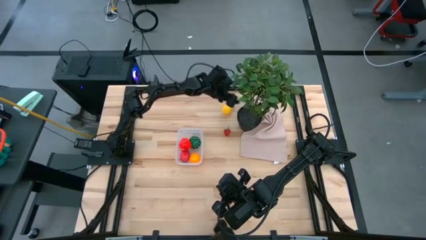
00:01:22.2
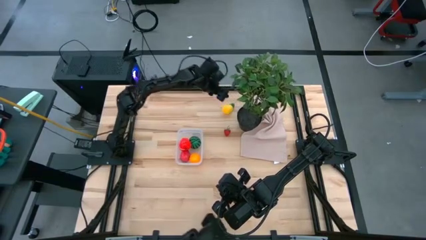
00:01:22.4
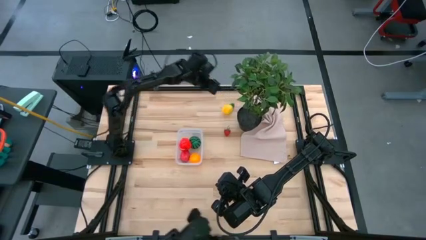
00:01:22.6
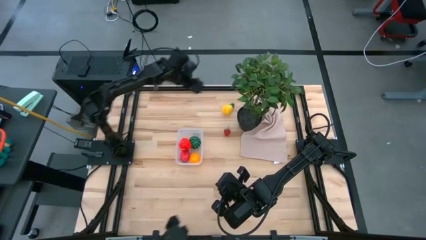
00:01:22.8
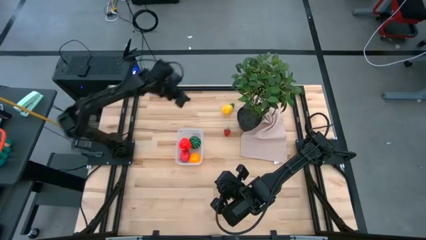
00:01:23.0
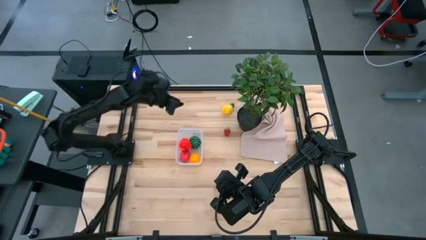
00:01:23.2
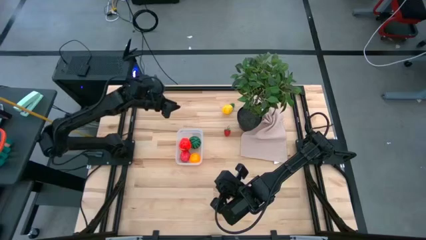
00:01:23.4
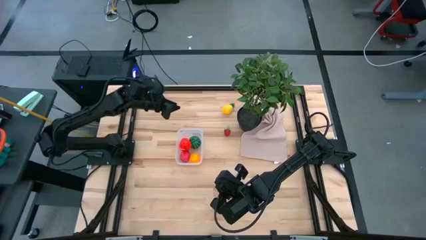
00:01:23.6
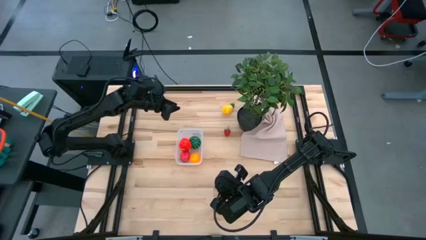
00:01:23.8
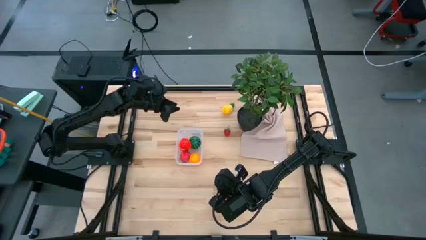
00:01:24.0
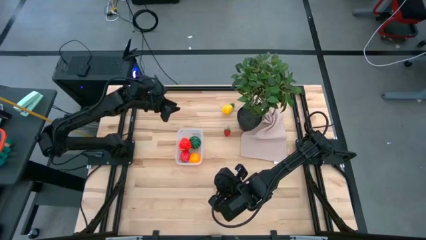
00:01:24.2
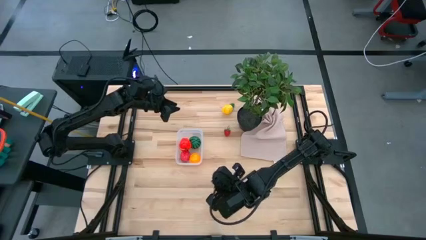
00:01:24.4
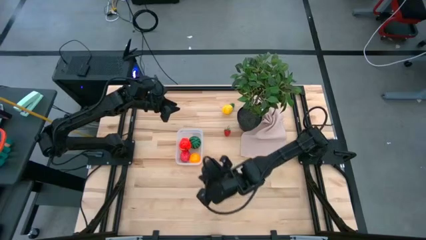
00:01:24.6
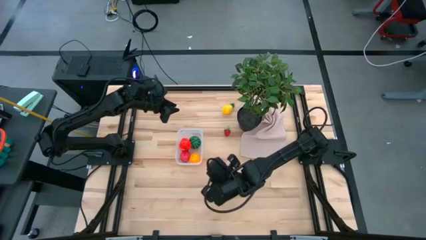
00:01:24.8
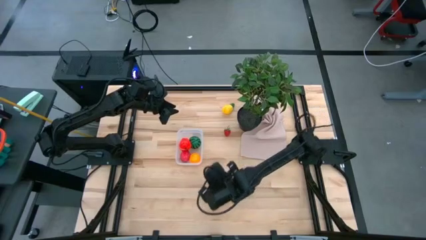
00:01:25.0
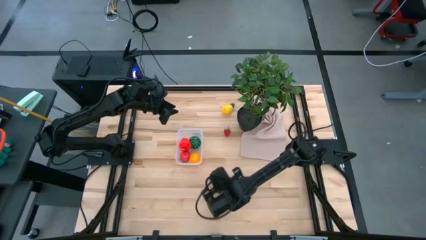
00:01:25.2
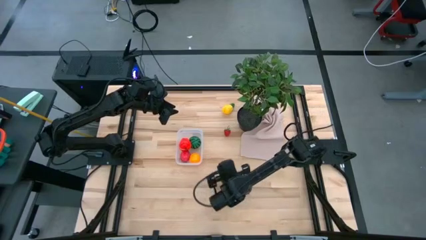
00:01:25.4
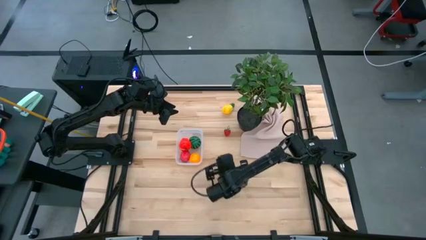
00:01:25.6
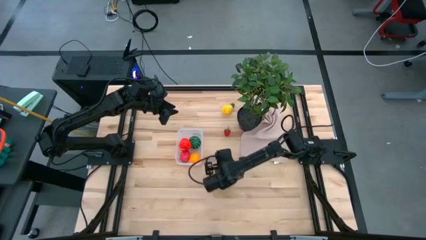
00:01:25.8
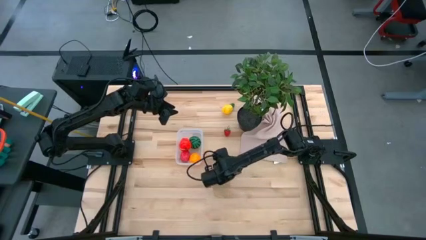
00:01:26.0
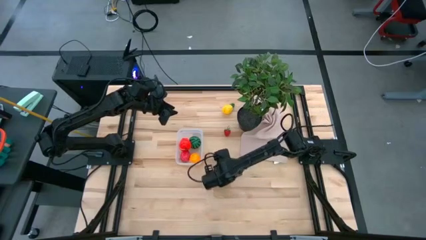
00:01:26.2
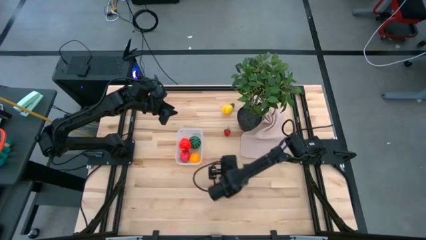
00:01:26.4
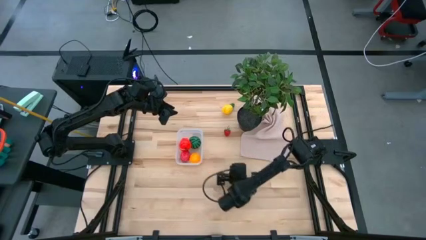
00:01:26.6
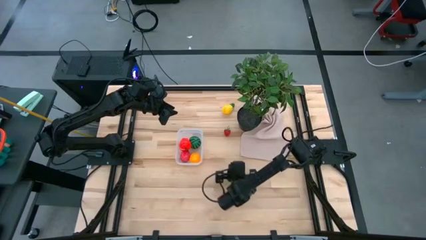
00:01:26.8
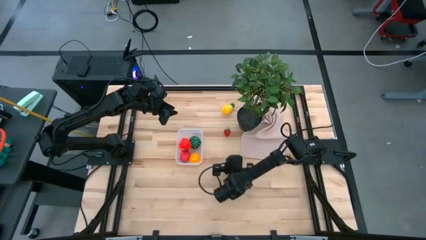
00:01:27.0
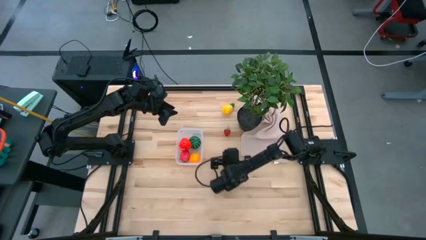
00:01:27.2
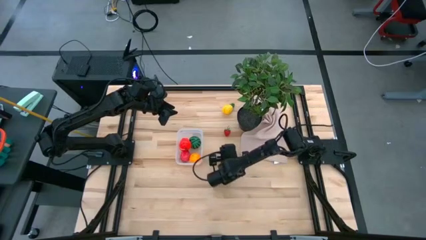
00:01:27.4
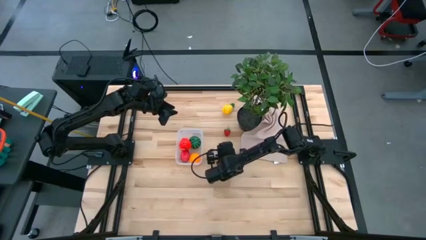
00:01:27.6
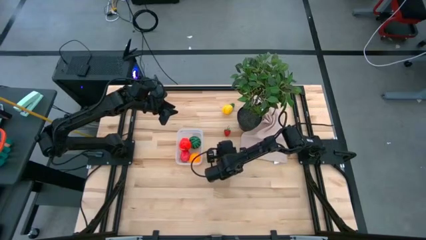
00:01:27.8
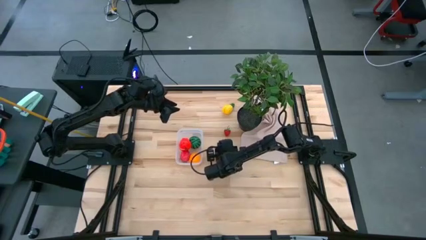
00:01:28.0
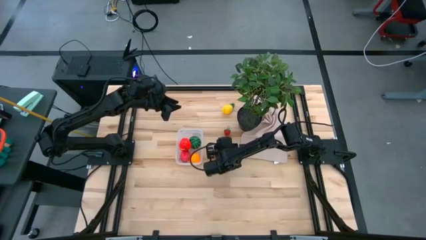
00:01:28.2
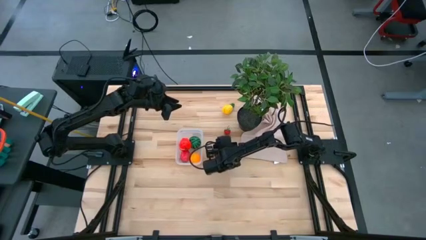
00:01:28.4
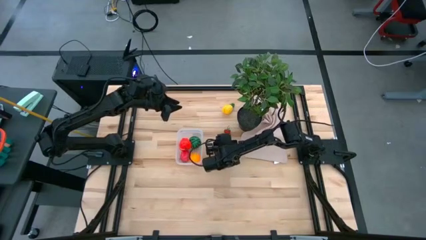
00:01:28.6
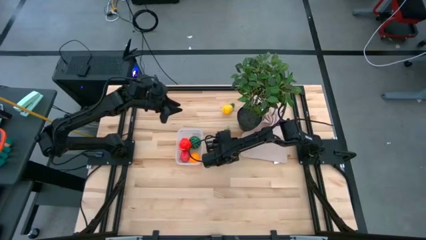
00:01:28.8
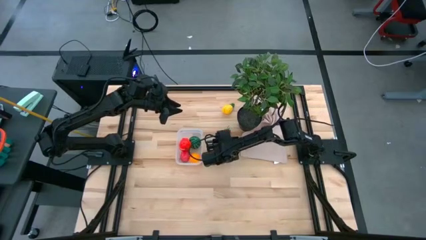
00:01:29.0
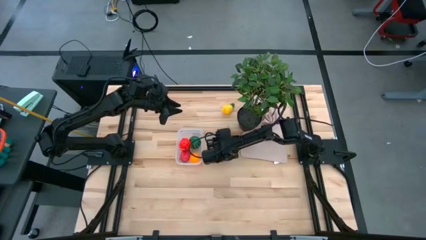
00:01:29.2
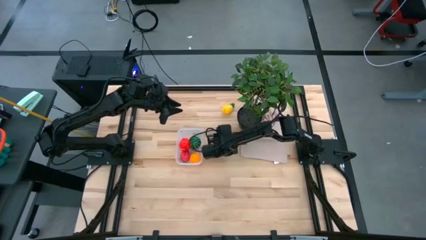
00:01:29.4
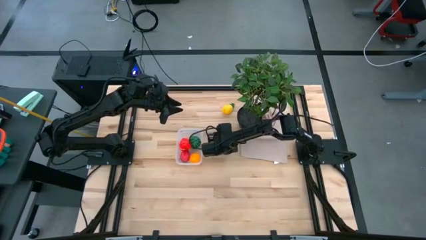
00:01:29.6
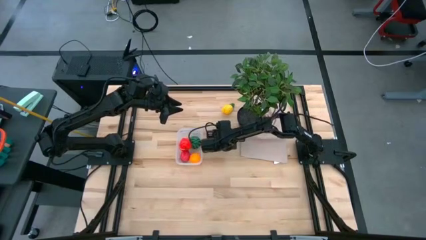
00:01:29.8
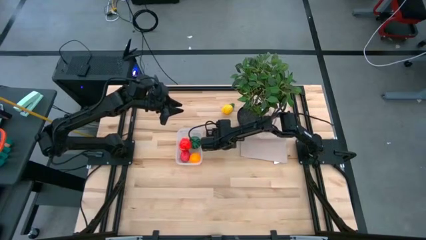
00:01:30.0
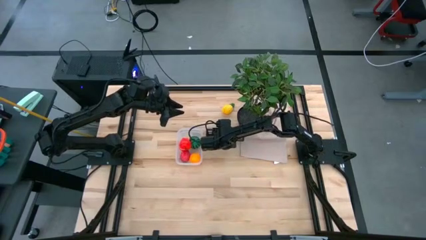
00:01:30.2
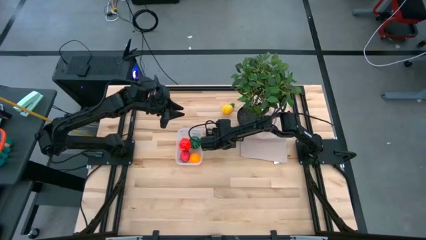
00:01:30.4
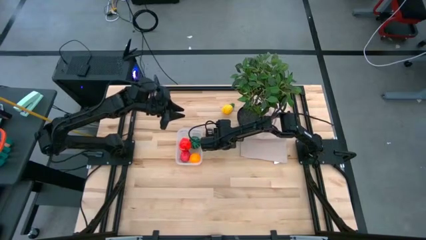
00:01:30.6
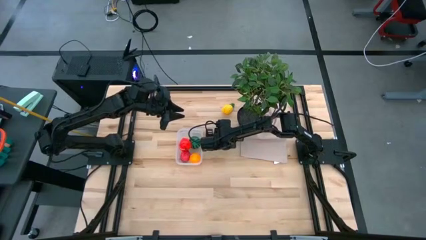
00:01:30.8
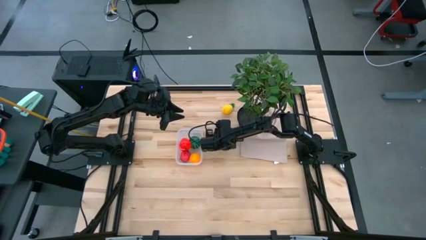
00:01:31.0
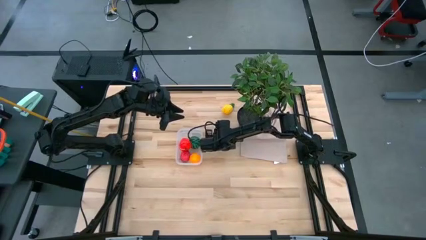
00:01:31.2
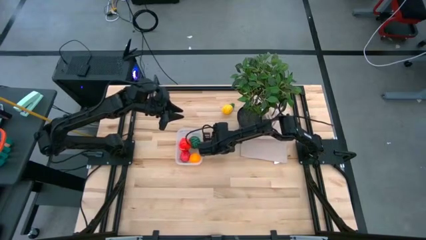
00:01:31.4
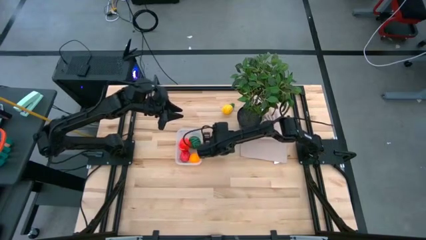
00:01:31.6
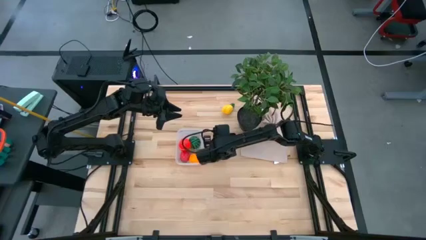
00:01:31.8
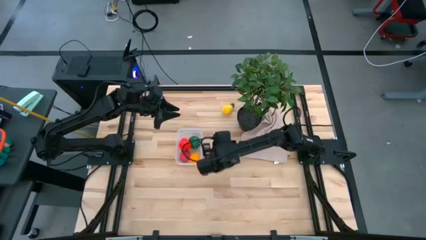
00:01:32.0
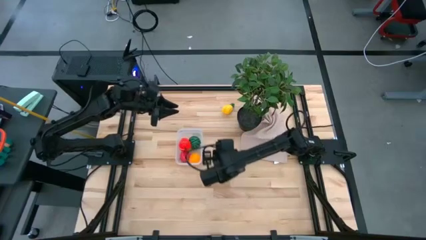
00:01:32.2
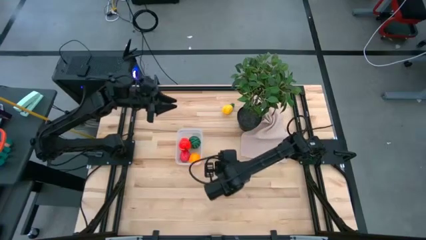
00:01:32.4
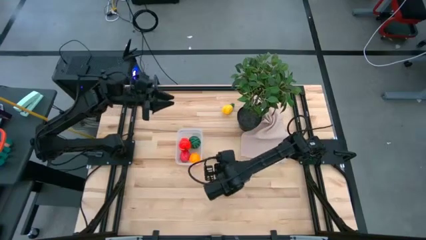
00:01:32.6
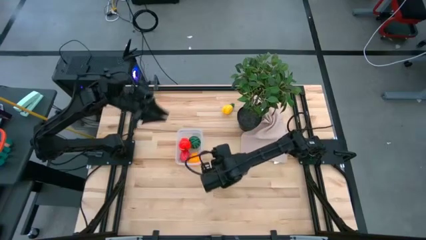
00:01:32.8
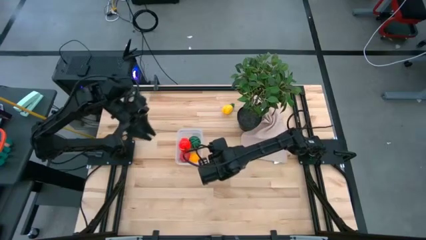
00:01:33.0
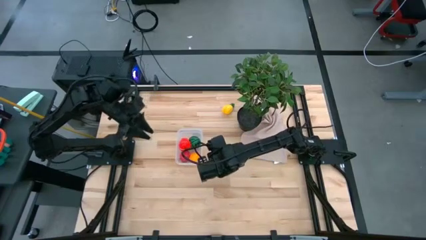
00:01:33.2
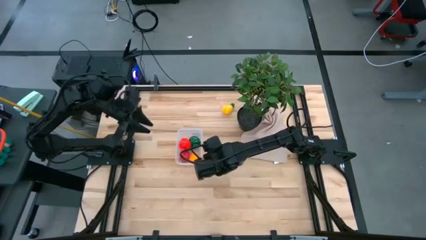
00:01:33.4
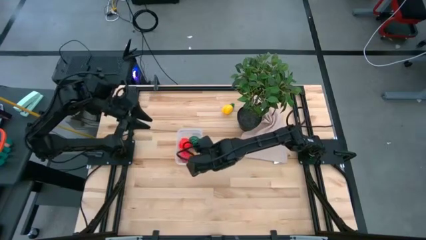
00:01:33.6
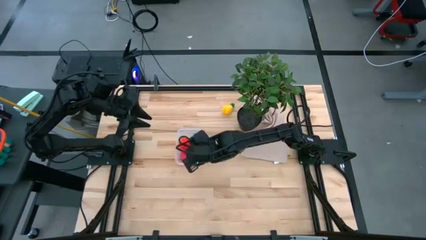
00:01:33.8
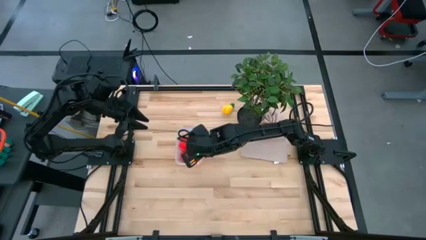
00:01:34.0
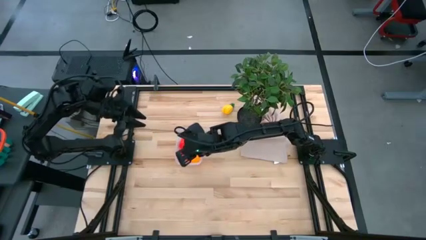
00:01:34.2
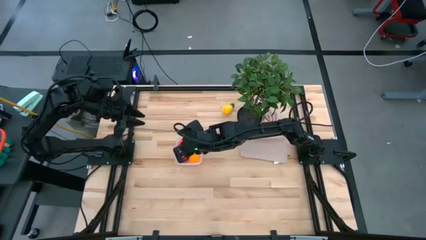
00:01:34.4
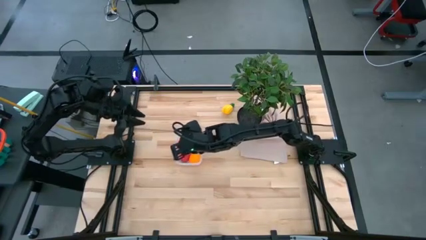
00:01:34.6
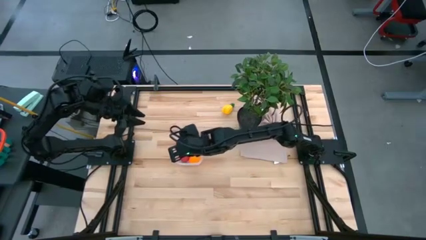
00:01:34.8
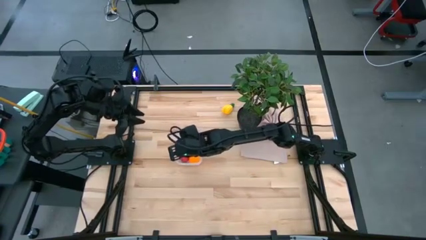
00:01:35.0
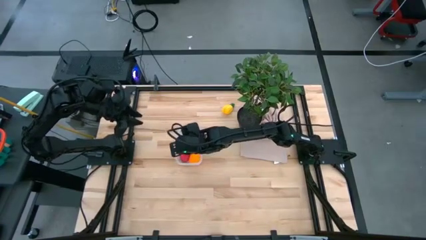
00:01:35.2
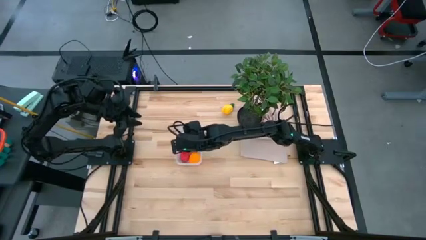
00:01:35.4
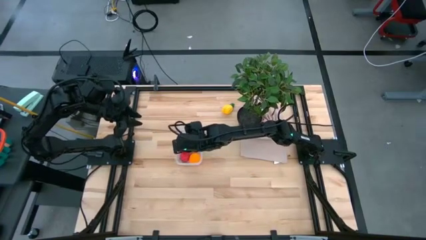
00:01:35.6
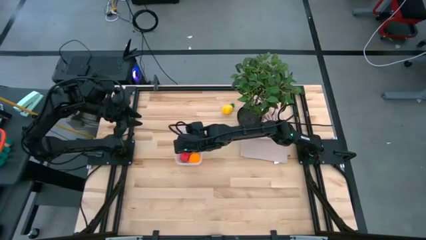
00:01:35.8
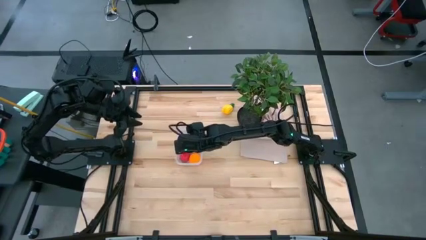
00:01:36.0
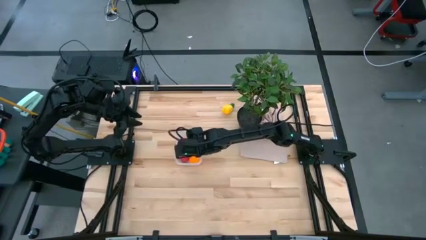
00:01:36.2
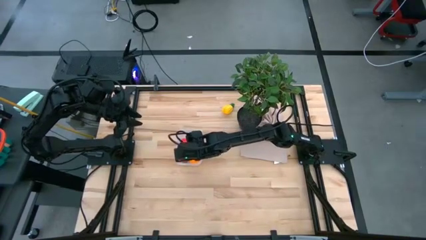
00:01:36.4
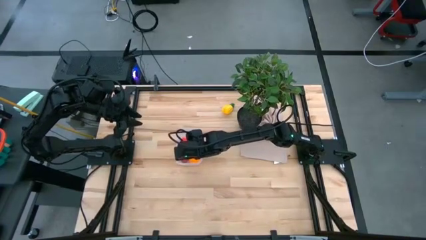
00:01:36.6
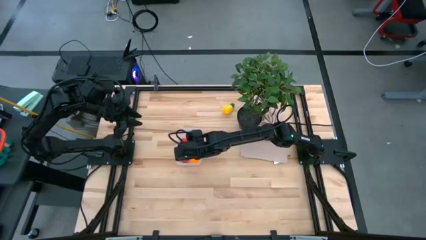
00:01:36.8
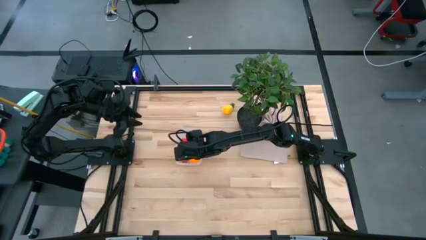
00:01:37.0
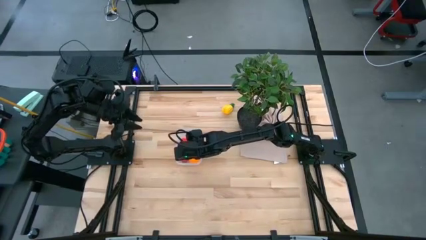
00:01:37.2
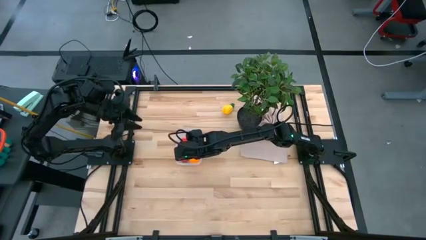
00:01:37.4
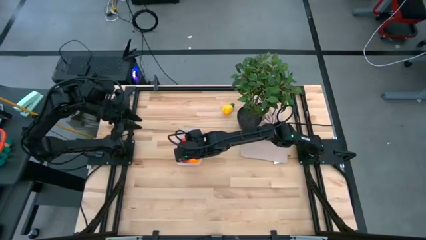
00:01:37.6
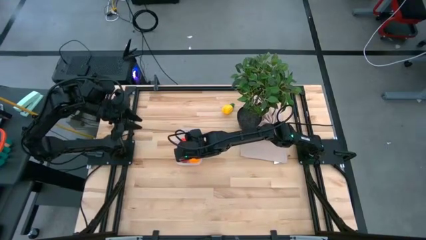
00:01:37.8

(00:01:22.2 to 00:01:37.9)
Task: Pick and placing Produce into tupperware
Put the red strawberry into the transparent bin

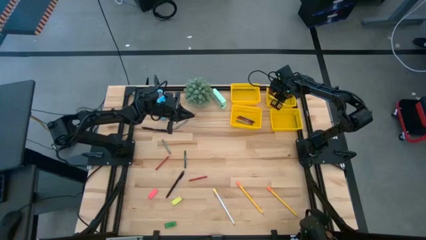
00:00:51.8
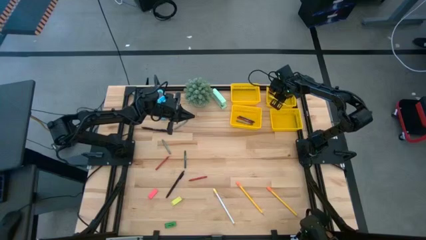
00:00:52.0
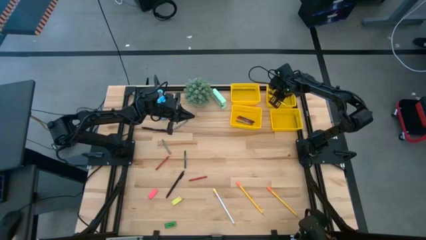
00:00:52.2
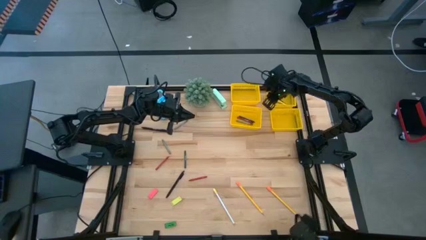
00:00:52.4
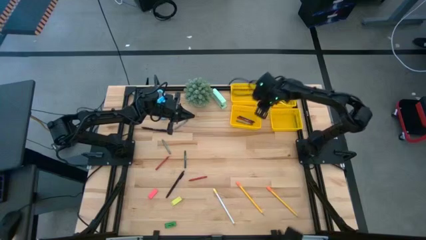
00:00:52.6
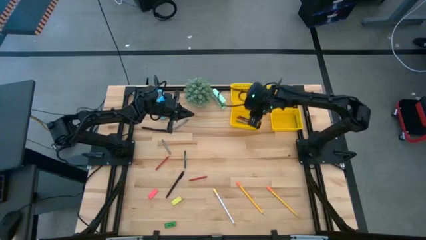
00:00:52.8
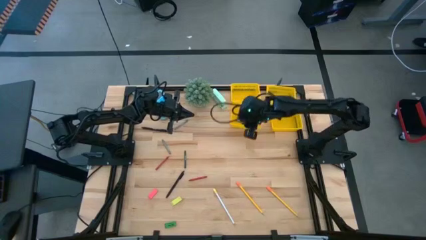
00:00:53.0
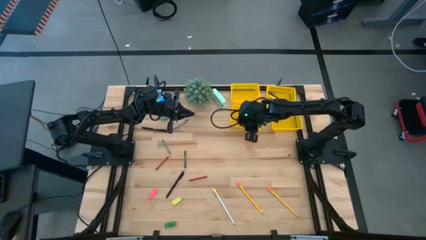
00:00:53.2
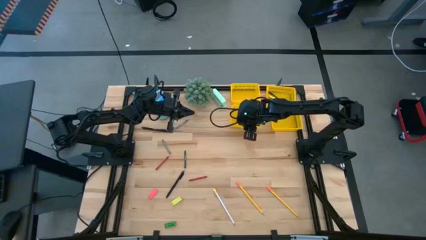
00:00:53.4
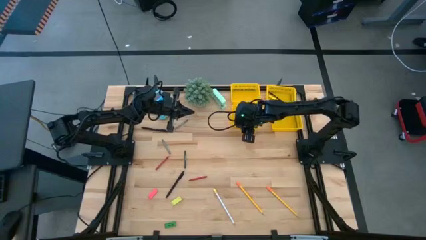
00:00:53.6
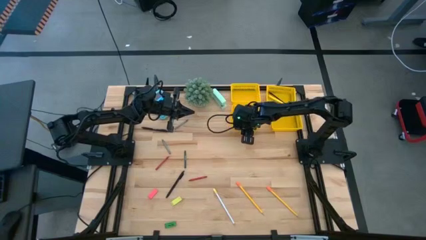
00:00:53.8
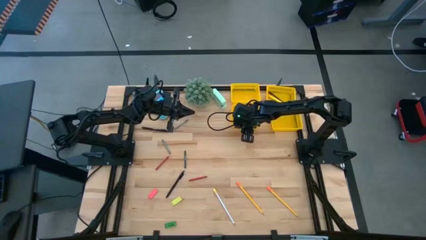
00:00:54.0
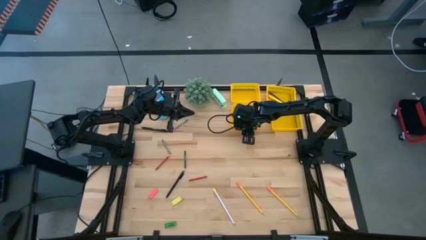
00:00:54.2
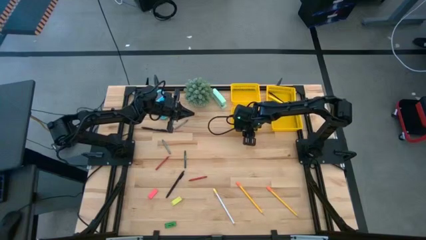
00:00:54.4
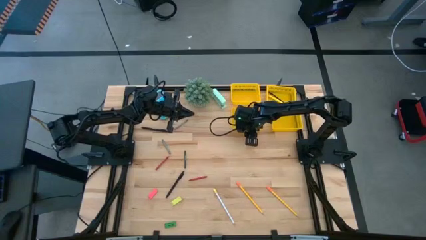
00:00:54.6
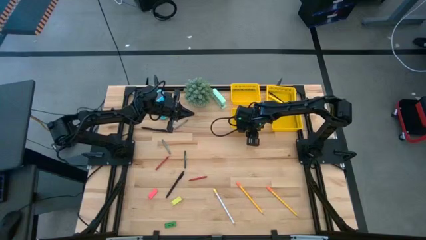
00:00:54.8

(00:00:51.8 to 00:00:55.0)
Task: Sort crayons/erasers/pens/pencils in bins
Adjust the bottom left yellow bin
